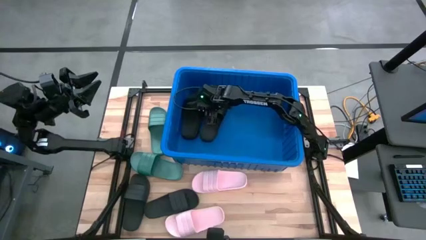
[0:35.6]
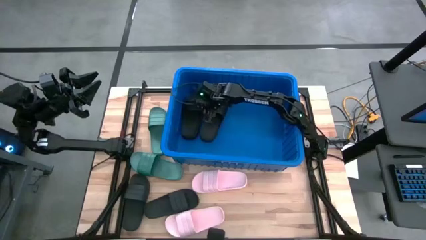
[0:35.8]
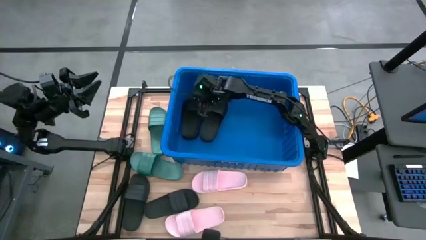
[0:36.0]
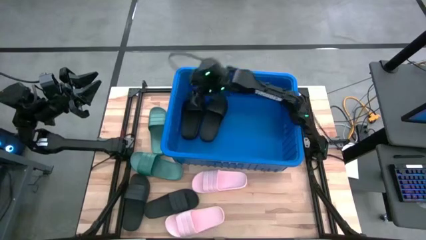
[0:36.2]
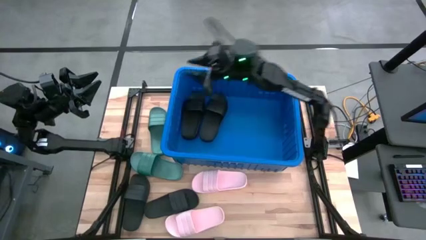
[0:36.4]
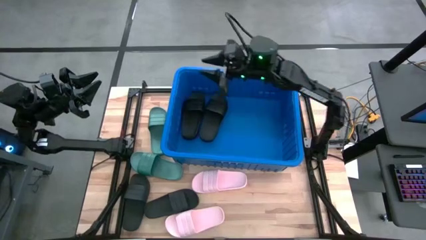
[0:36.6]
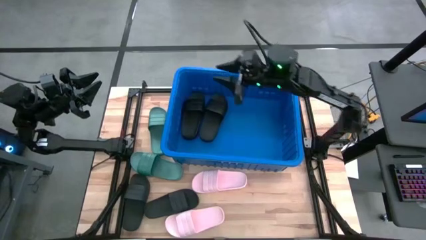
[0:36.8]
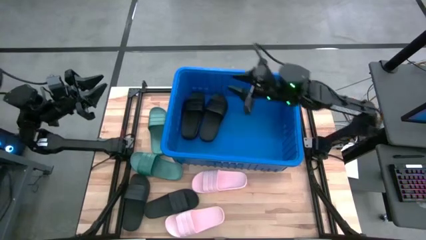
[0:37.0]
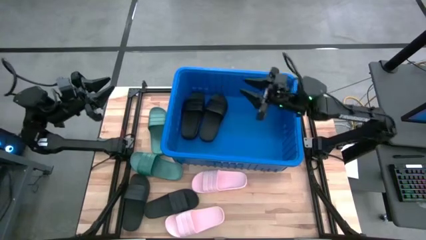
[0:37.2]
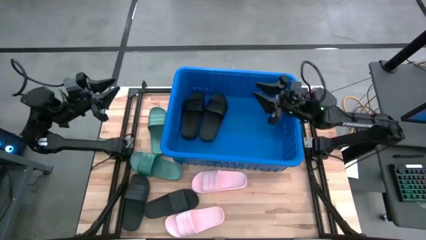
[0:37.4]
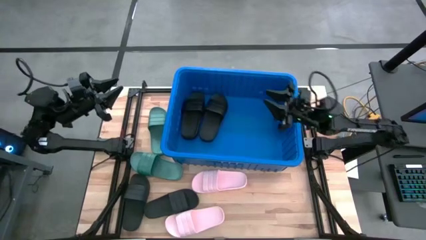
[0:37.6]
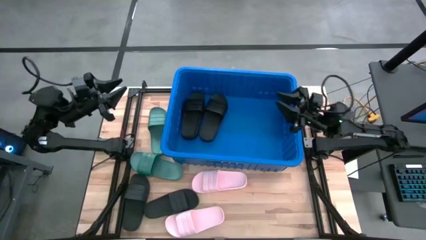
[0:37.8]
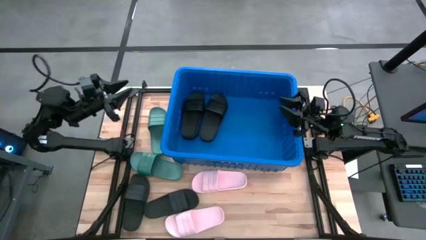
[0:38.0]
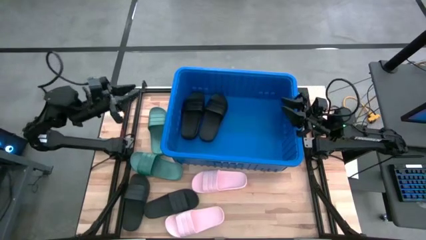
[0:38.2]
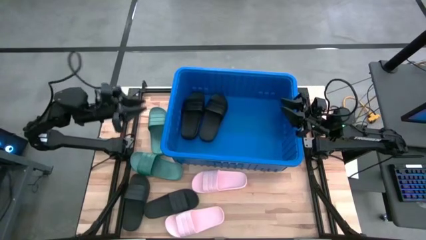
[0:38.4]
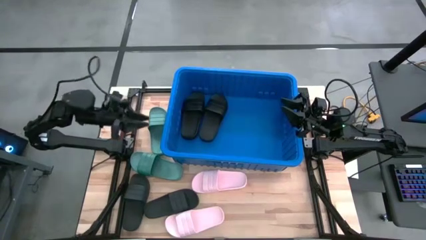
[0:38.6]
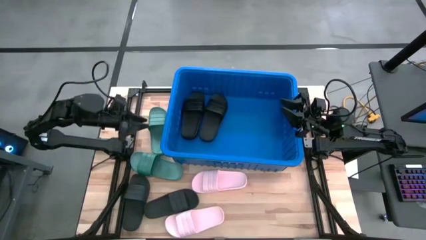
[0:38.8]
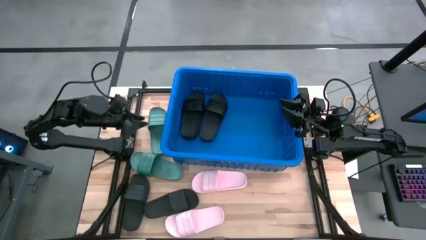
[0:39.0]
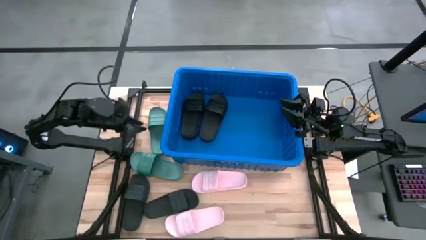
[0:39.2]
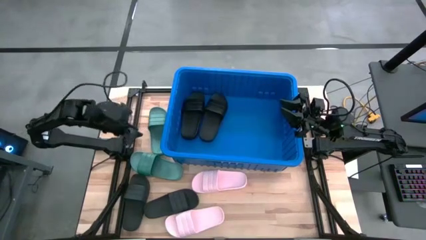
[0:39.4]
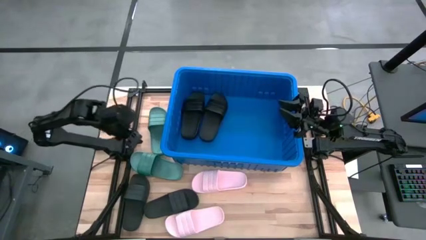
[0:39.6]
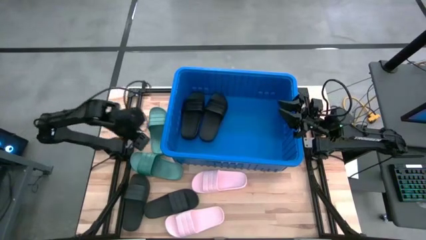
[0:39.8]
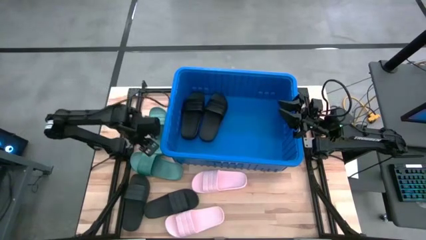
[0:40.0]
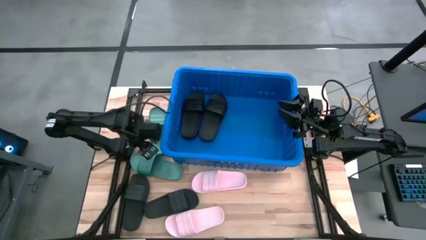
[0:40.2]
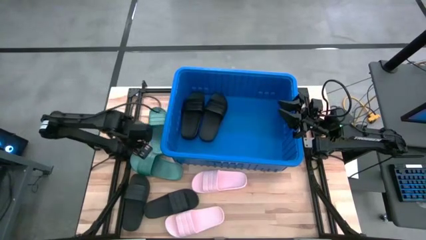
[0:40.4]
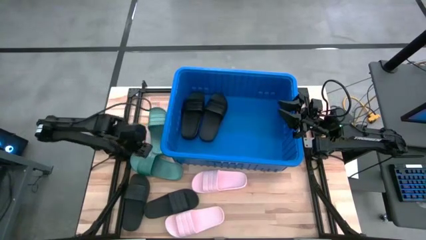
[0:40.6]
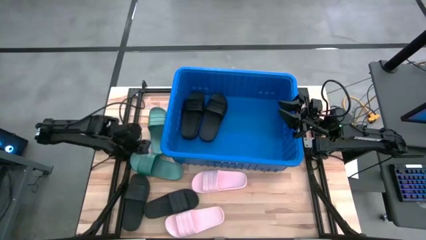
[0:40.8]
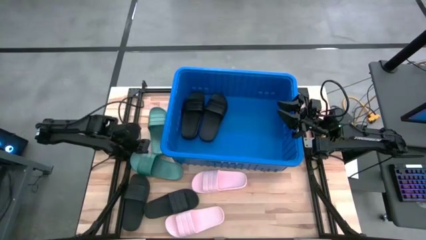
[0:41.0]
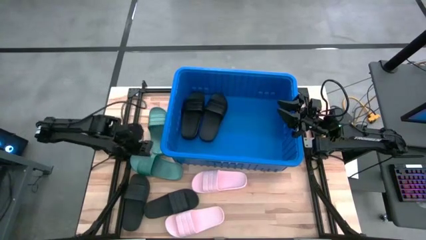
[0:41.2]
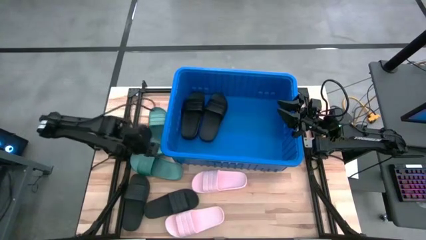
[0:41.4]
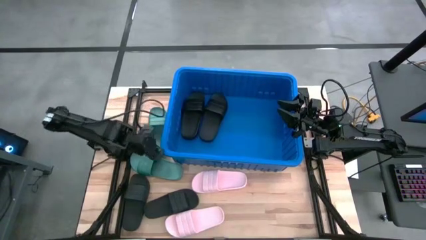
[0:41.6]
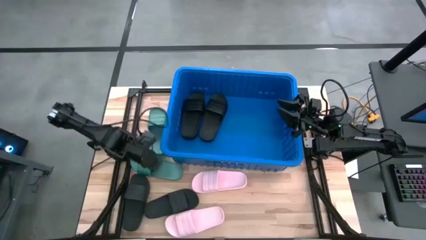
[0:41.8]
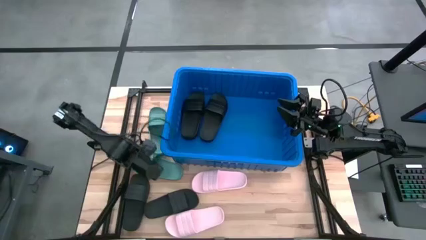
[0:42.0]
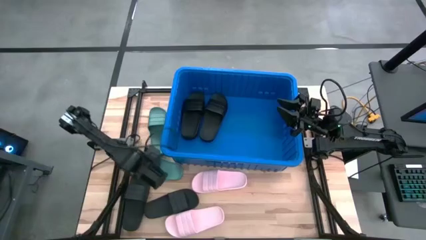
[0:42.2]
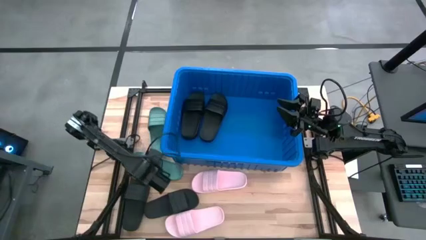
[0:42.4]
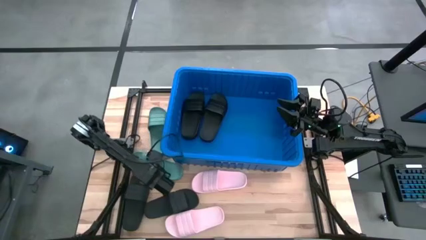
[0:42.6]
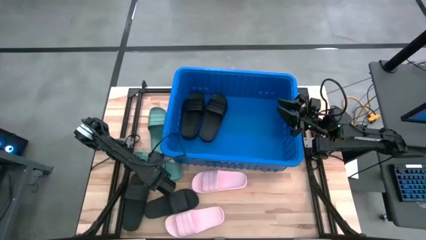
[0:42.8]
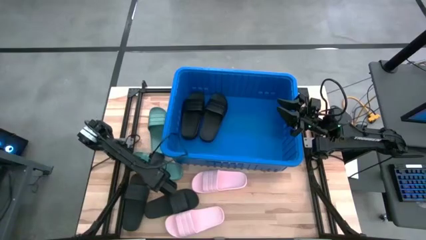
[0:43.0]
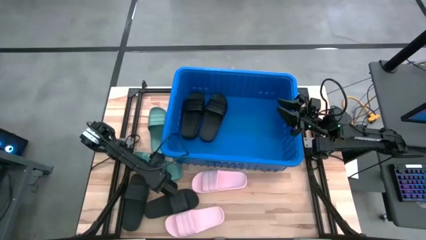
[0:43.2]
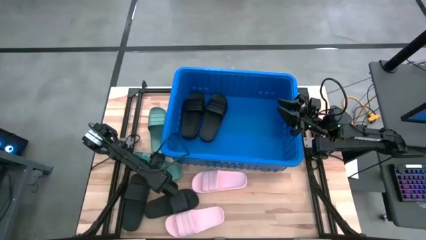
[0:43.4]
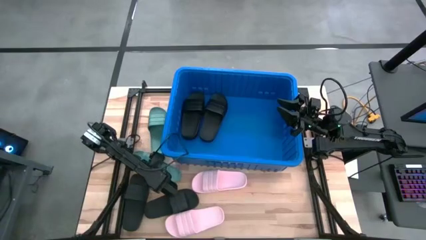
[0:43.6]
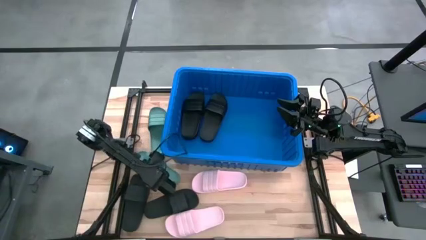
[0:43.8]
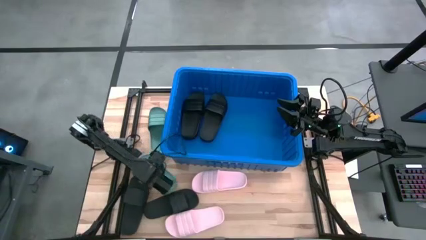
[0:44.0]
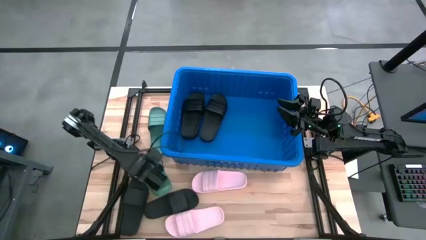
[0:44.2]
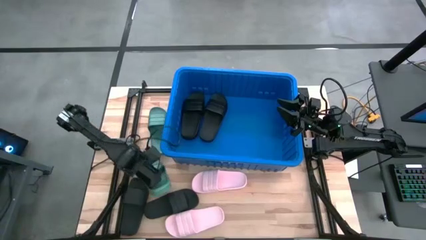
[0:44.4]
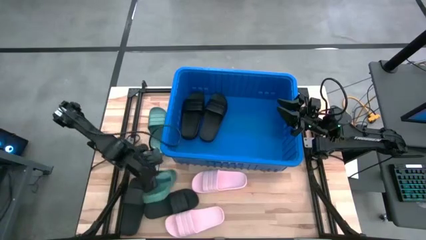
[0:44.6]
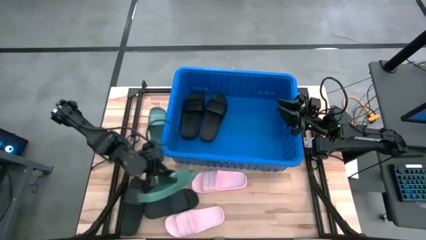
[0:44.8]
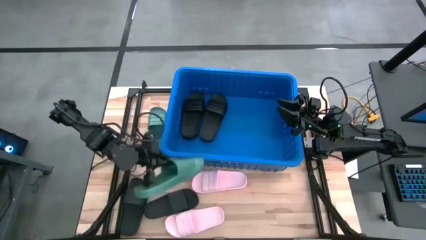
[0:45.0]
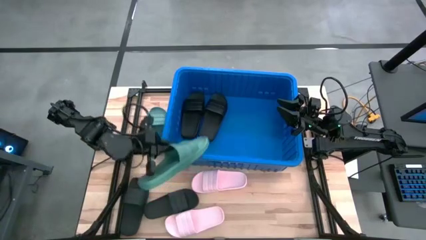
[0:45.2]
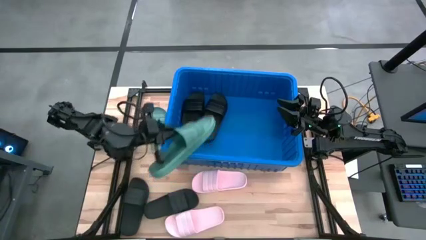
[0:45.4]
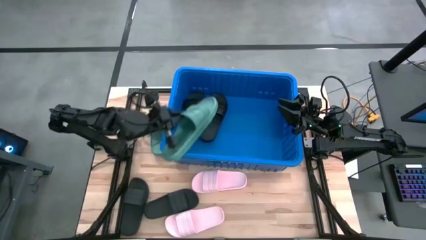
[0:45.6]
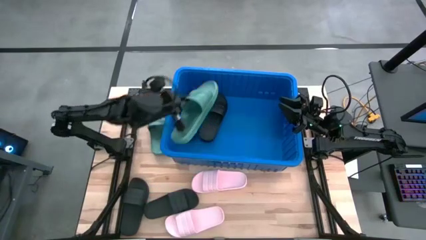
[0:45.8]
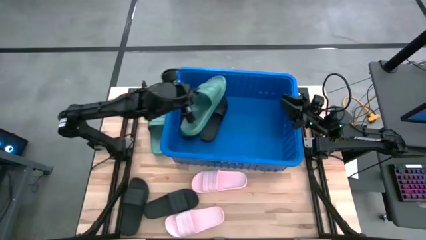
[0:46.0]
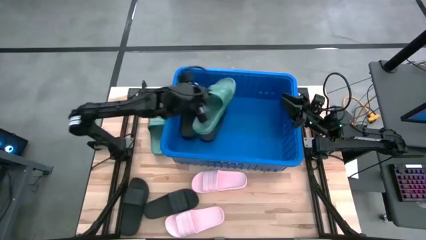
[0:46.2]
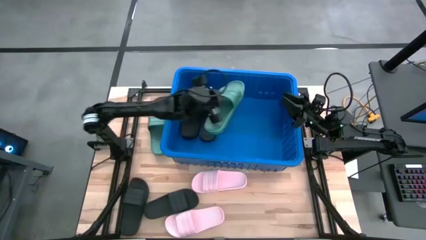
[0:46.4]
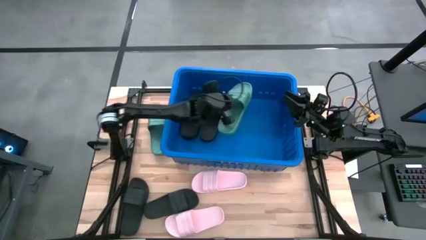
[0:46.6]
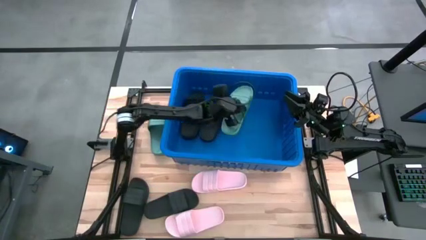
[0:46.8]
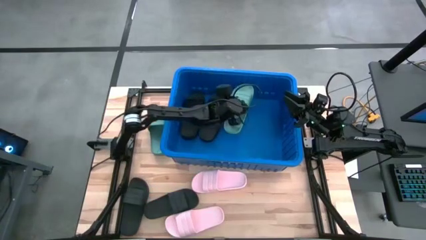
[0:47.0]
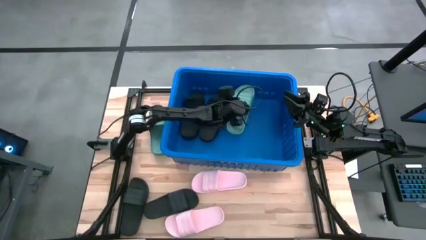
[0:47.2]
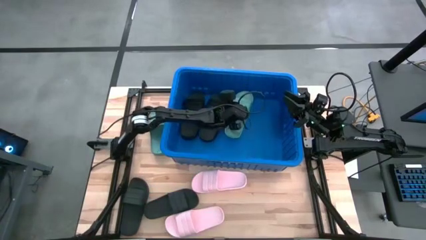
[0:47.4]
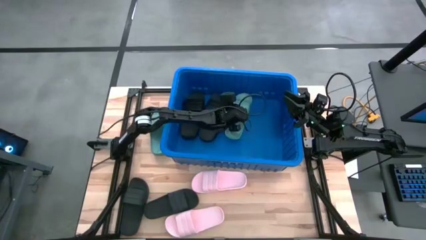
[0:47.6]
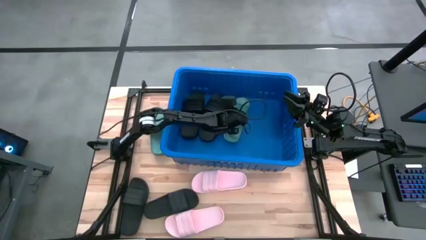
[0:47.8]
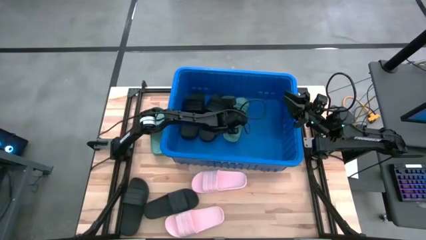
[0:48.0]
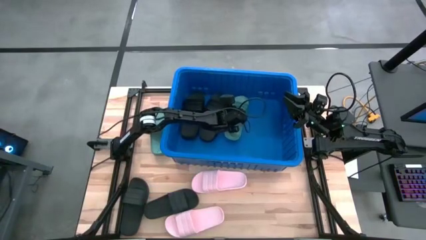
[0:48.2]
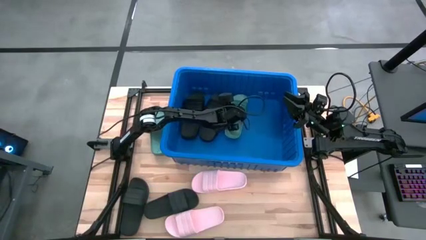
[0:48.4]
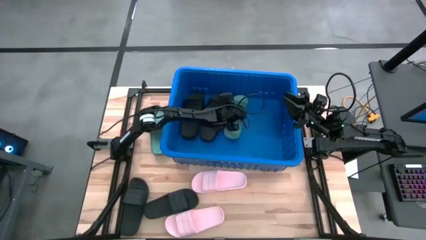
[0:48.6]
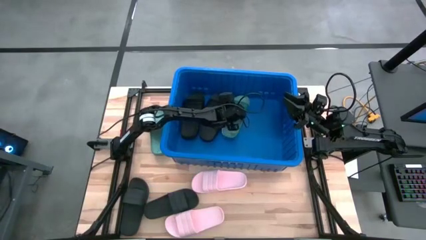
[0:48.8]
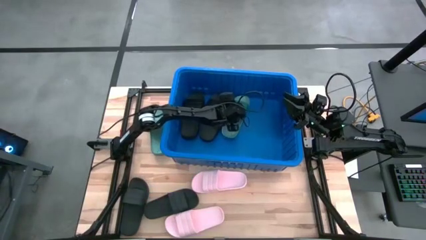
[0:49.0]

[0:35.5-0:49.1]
Task: Pick and place slides into bin
Put the bottom green slide into the blue bin

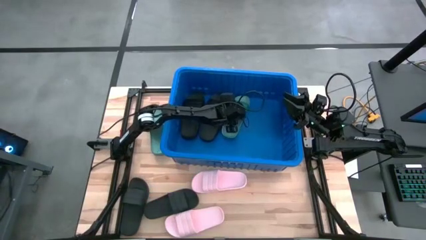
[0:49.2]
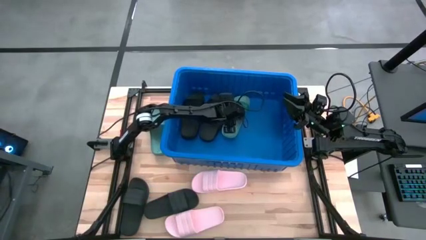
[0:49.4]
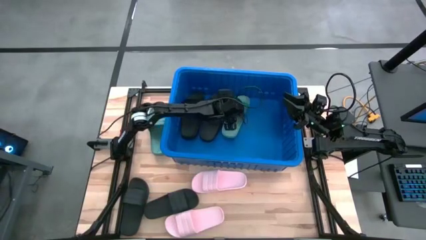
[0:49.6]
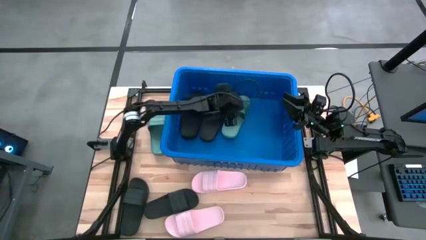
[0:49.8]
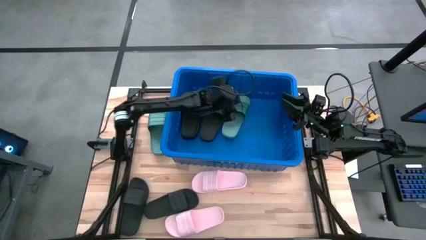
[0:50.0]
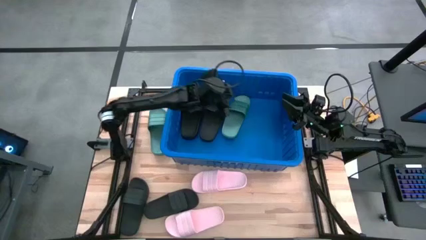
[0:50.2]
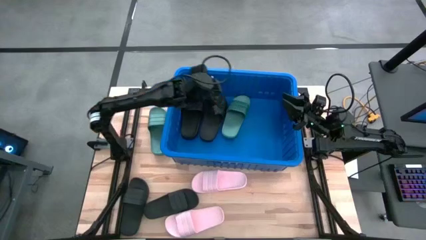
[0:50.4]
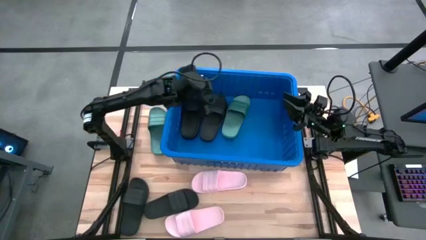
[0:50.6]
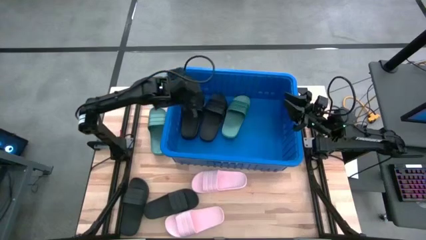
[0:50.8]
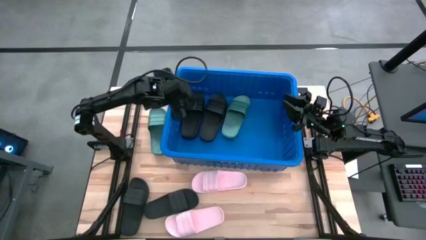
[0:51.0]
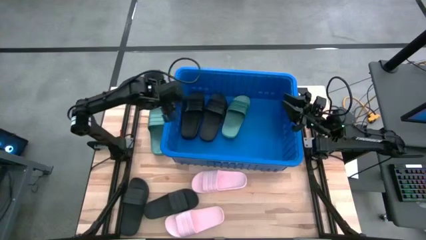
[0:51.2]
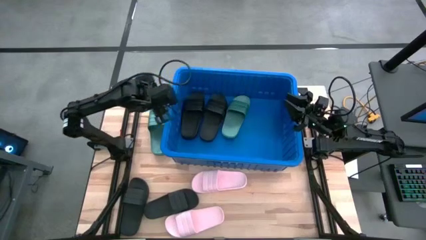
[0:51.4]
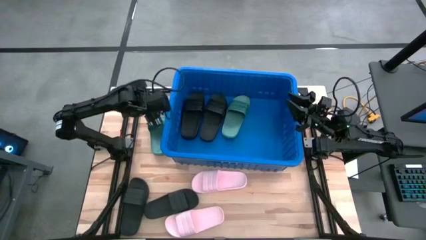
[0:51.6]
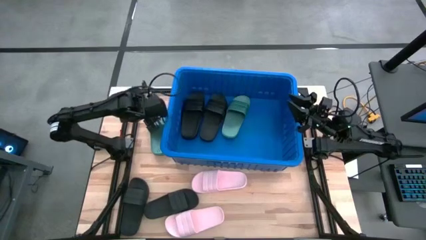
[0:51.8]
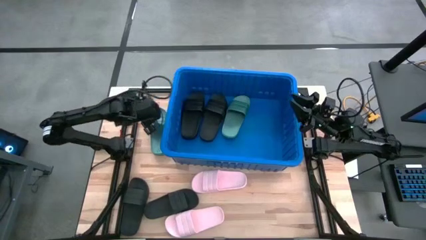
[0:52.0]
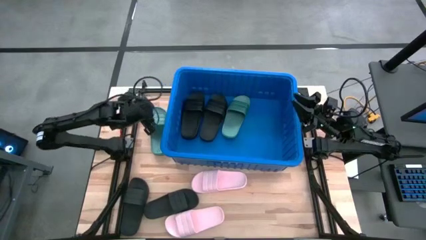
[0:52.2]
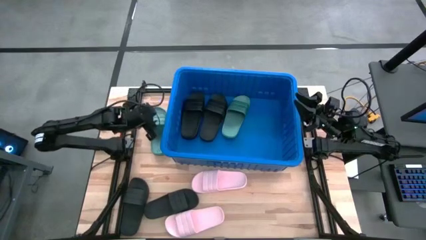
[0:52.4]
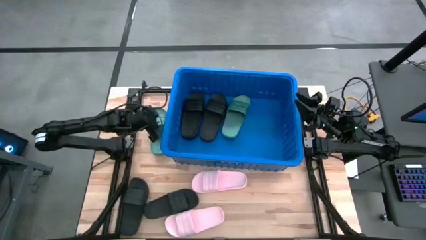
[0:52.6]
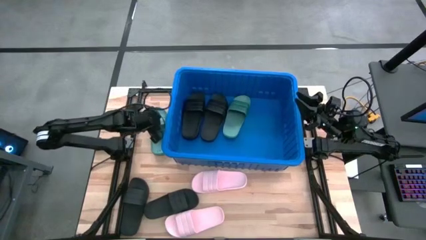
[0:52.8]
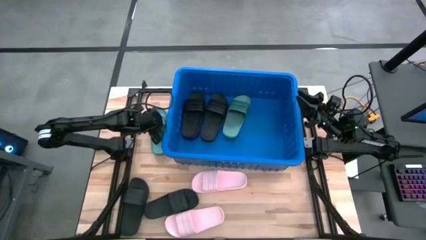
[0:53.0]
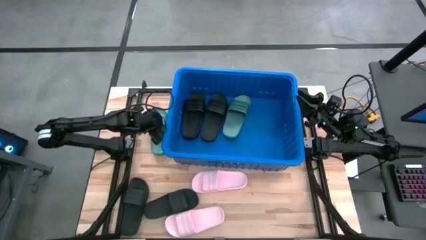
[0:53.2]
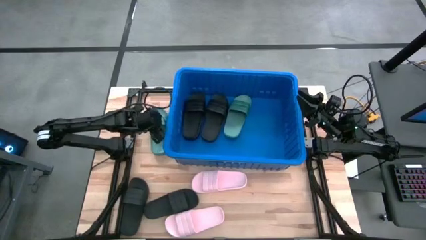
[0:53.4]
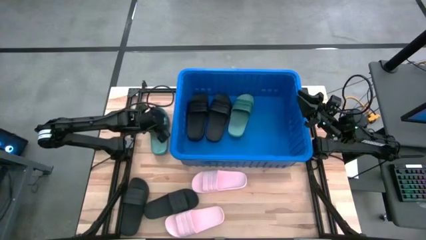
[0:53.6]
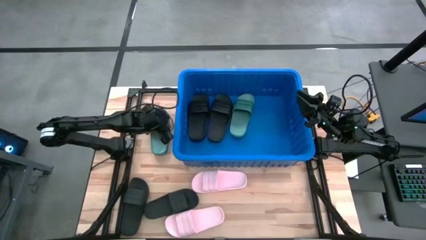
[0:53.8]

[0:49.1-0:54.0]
Adjust the blue bin on the table
